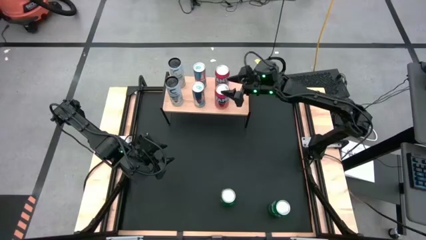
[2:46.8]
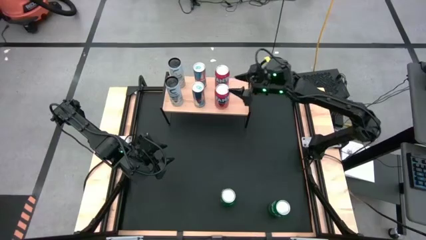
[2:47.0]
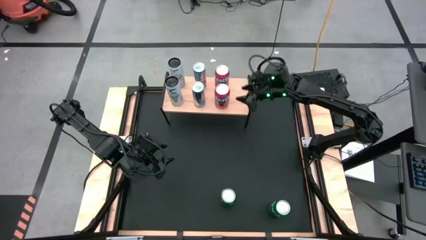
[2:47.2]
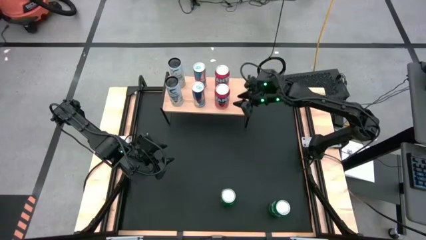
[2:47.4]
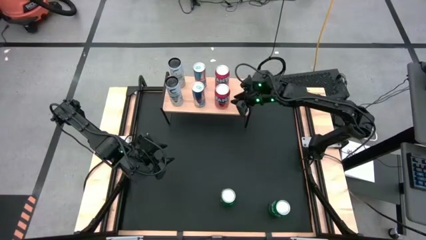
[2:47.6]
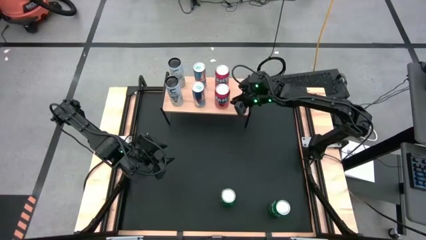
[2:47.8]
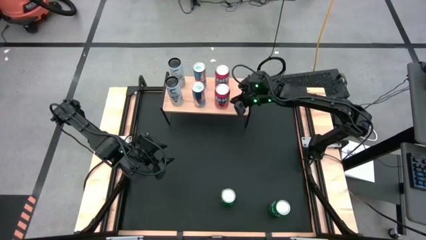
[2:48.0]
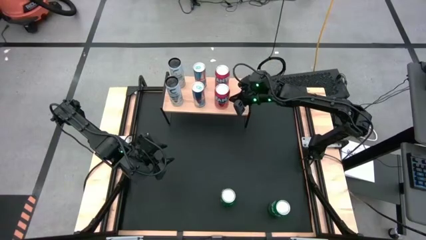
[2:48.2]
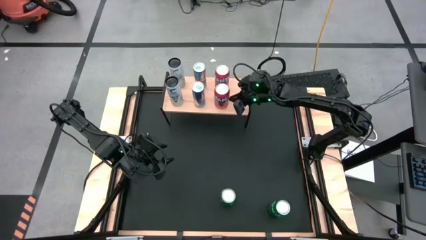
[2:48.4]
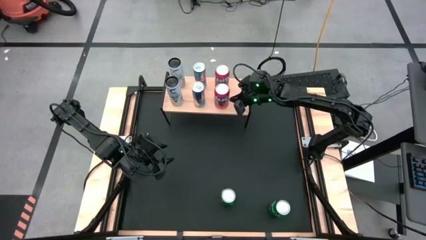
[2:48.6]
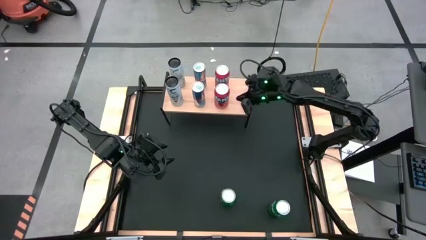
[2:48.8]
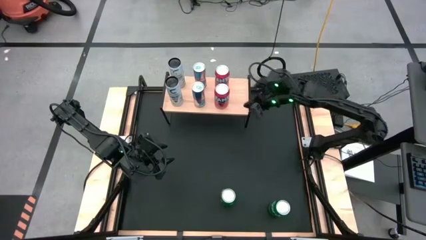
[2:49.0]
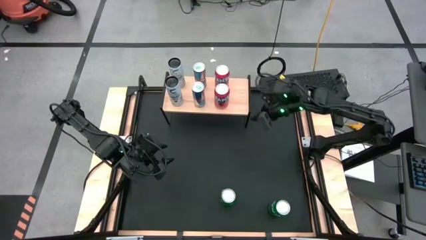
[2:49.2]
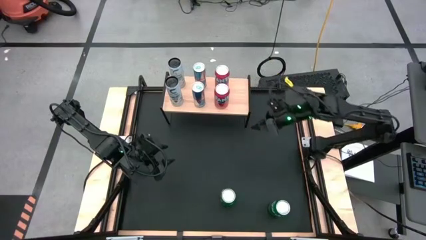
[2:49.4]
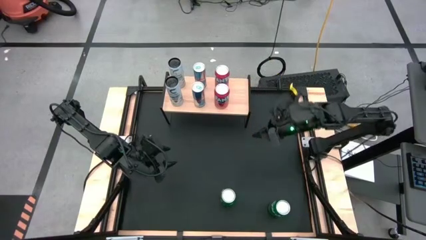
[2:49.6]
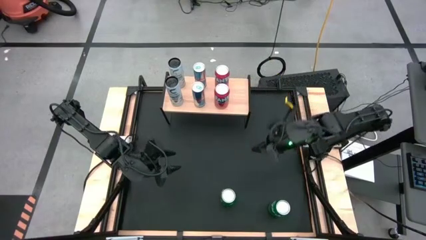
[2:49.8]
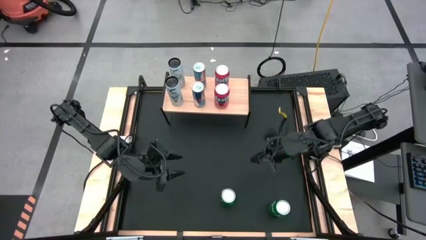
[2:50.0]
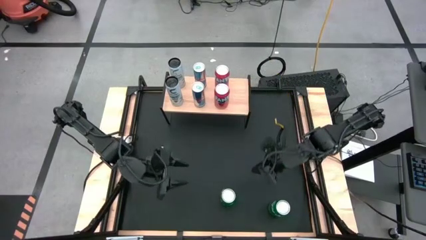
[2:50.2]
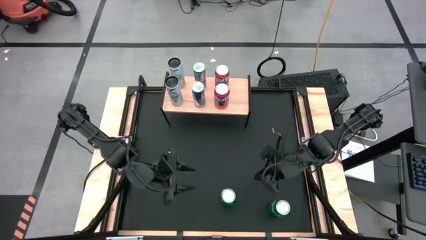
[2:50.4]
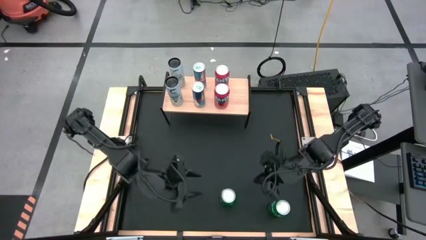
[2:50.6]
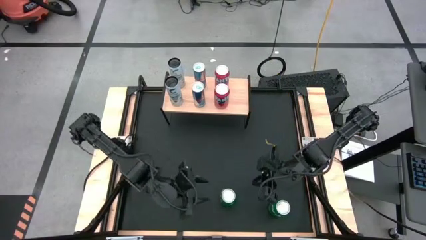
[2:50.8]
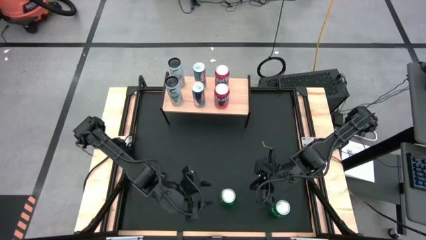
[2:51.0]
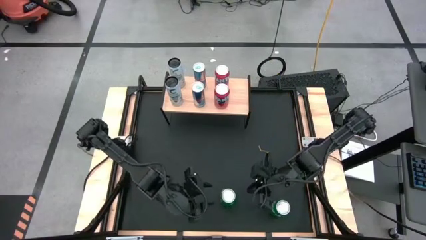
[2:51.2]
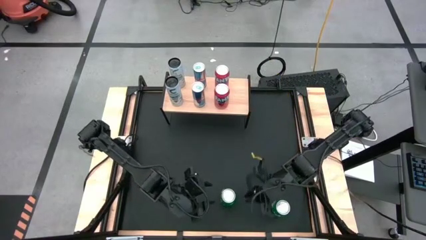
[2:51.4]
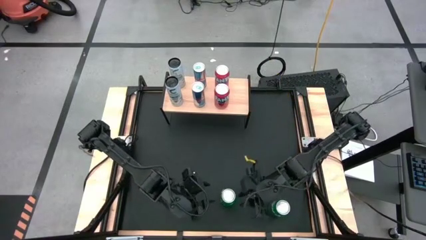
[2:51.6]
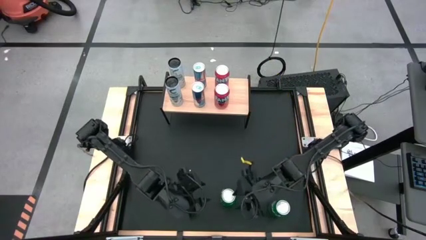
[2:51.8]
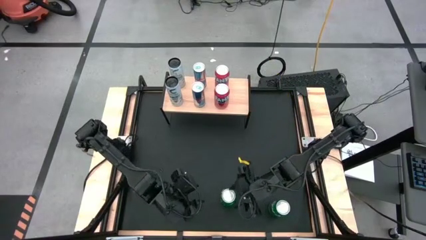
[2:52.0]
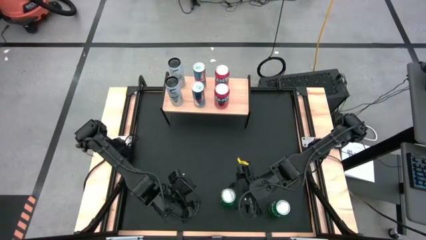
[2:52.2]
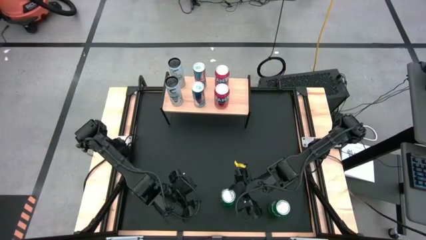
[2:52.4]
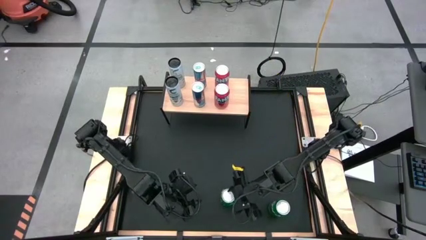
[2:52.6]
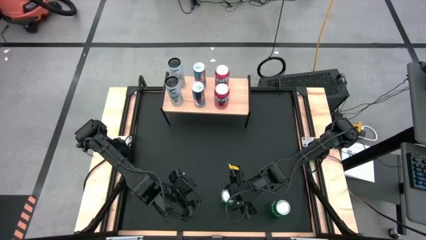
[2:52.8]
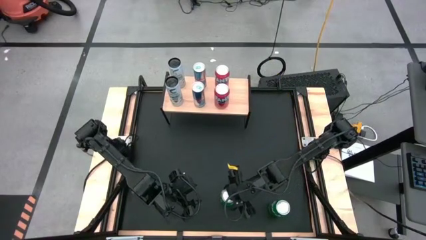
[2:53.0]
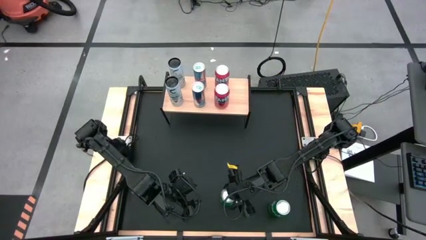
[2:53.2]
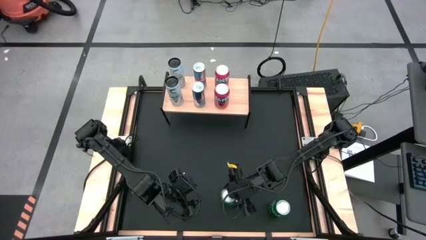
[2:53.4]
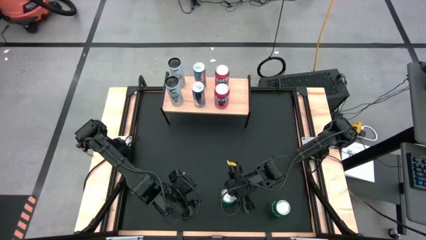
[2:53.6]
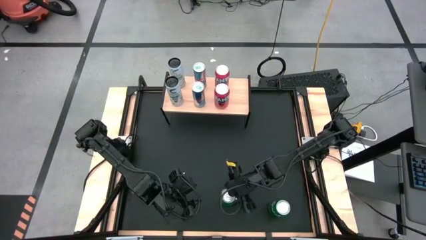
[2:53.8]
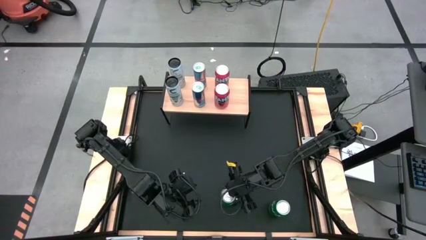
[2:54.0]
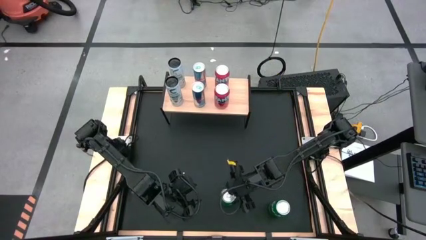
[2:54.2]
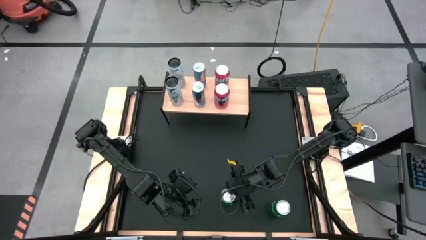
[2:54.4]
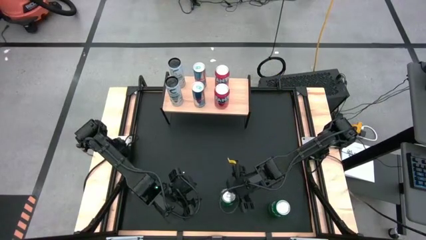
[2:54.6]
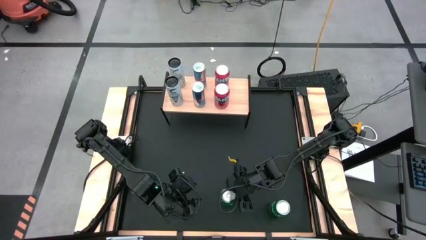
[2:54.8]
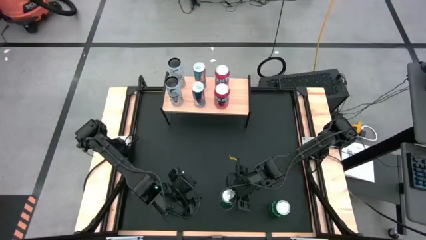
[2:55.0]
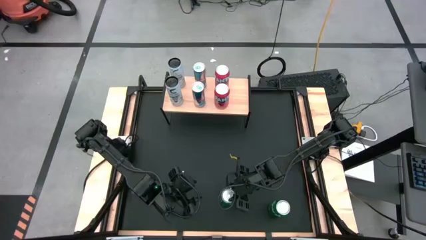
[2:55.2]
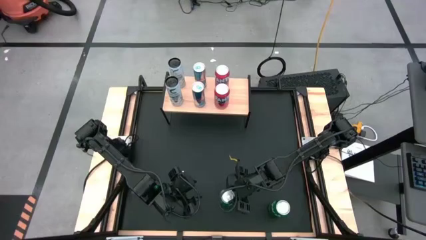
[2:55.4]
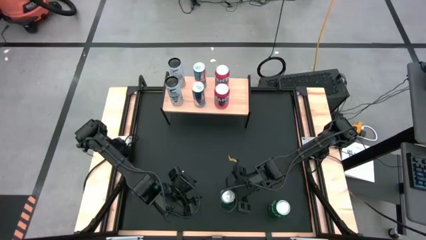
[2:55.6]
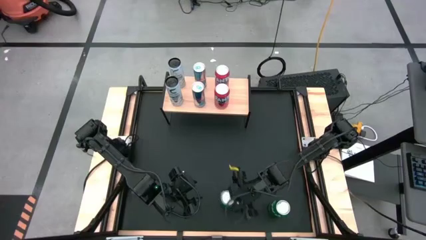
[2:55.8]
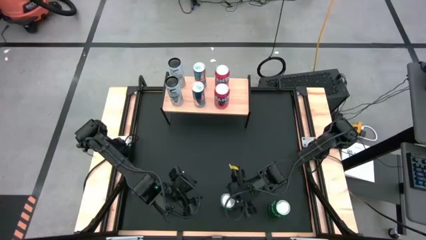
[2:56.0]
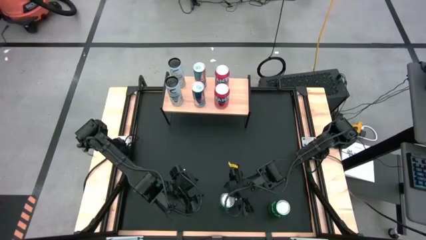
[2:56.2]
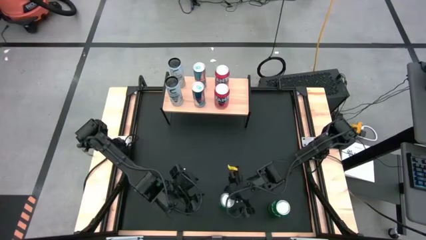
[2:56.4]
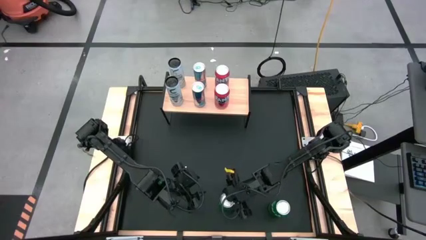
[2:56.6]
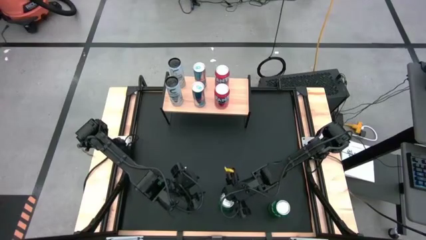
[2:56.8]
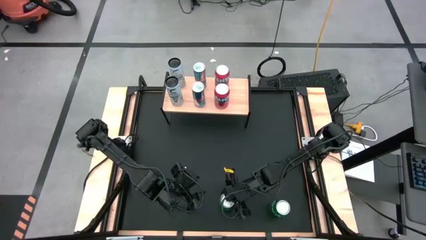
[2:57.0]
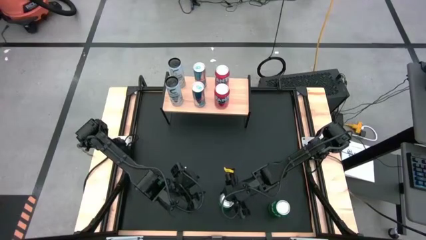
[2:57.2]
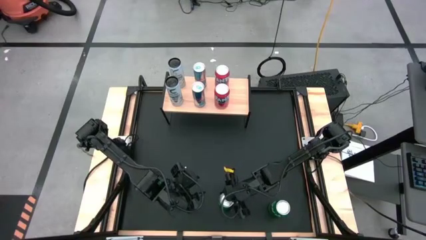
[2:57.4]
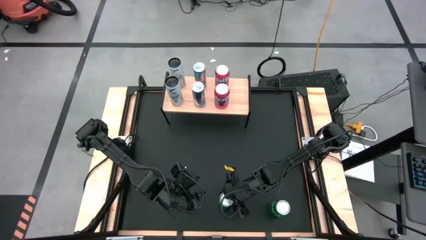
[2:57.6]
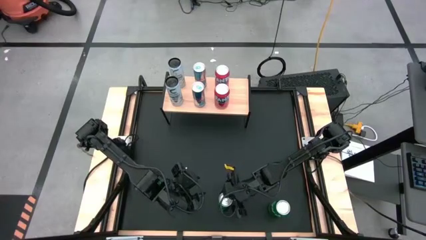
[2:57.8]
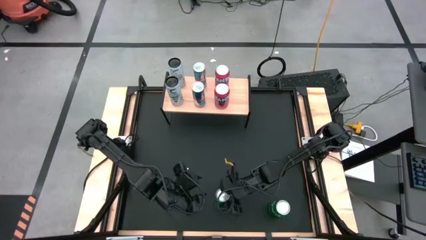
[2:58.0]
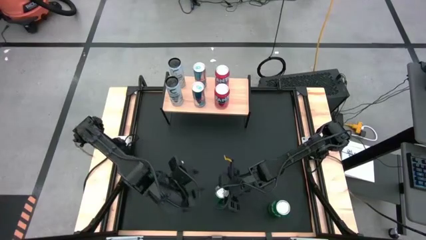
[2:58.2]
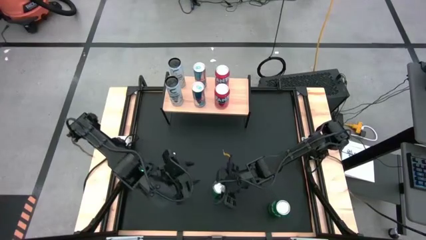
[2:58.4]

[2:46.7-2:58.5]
Task: Place canned beverage on shelf
Put the left green soda can on the shelf

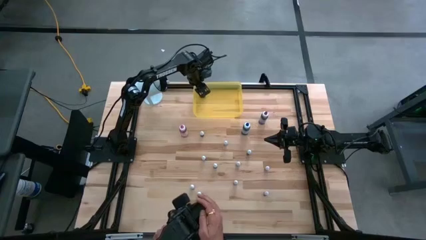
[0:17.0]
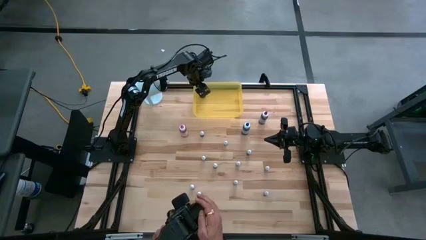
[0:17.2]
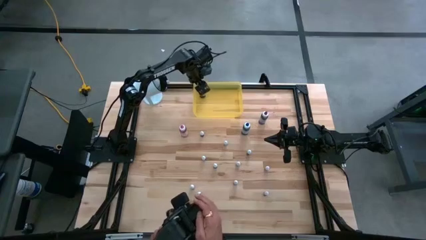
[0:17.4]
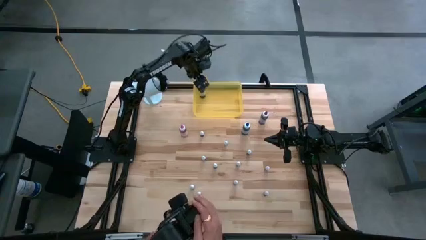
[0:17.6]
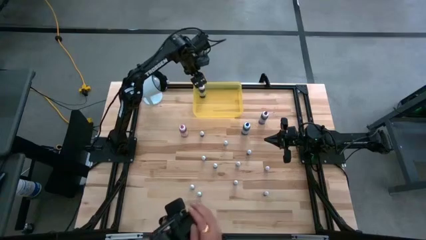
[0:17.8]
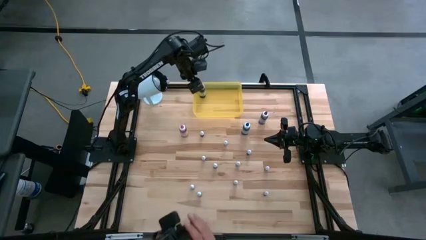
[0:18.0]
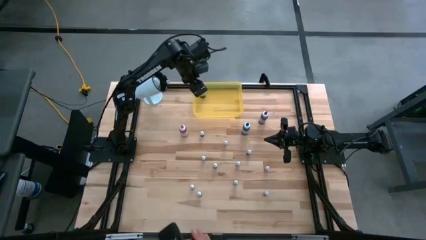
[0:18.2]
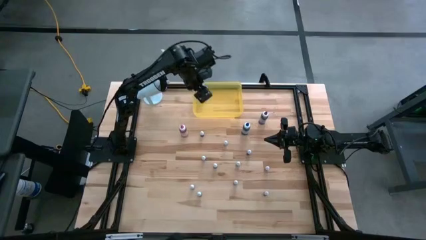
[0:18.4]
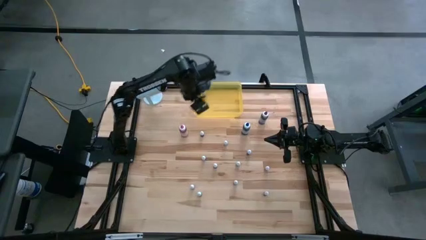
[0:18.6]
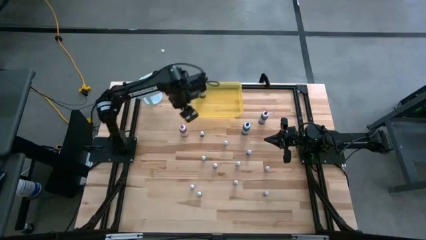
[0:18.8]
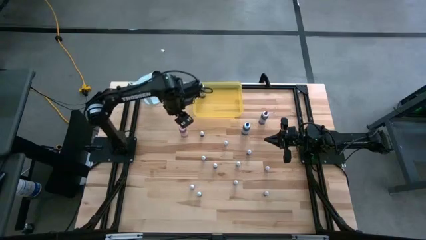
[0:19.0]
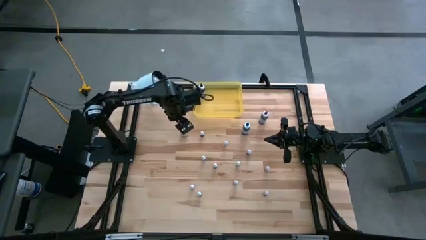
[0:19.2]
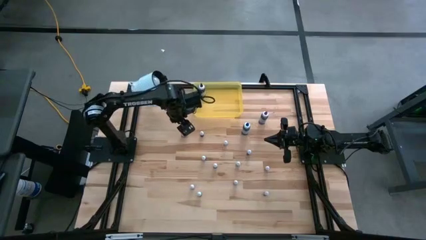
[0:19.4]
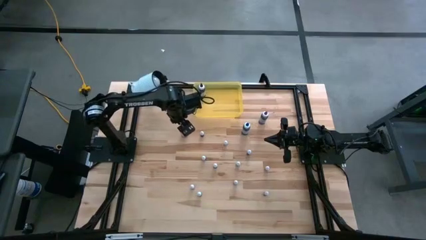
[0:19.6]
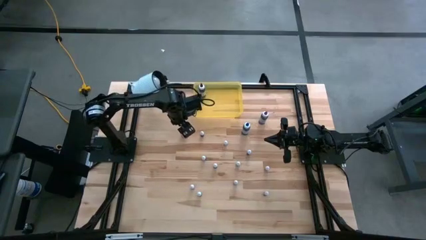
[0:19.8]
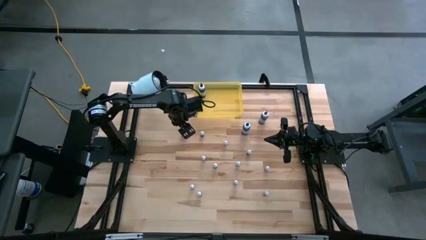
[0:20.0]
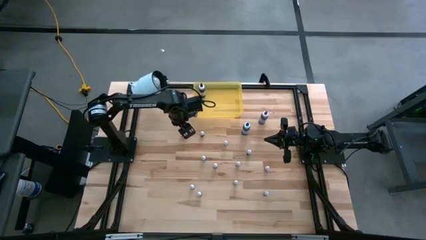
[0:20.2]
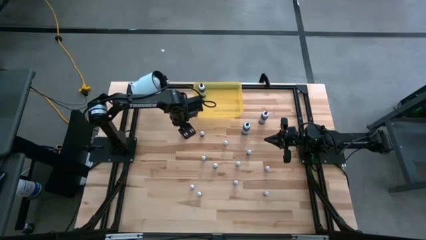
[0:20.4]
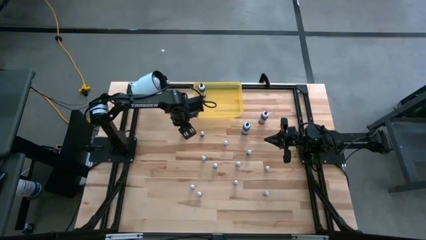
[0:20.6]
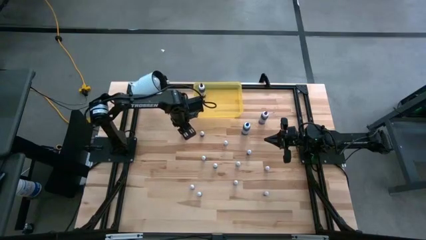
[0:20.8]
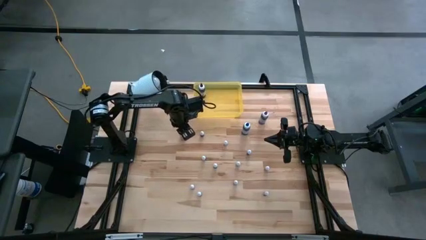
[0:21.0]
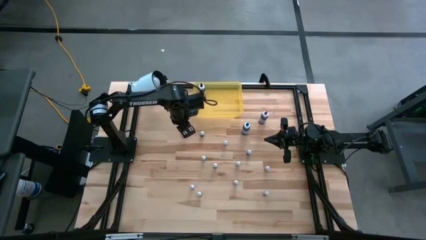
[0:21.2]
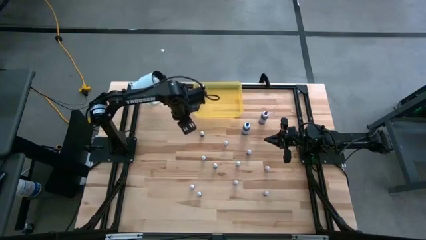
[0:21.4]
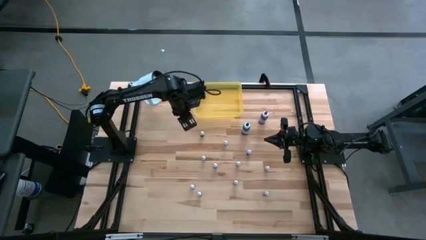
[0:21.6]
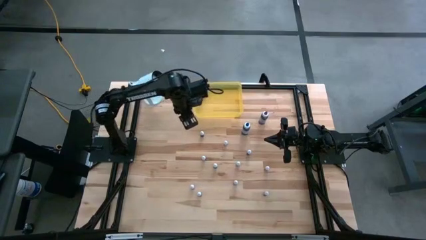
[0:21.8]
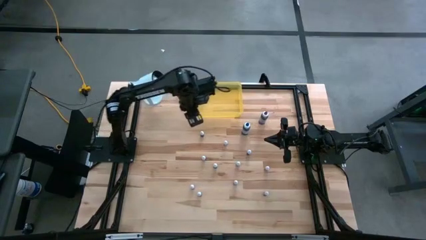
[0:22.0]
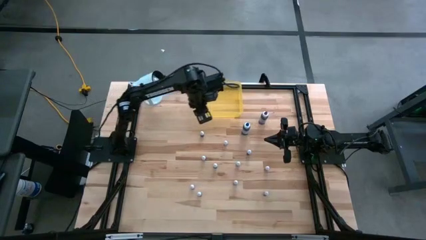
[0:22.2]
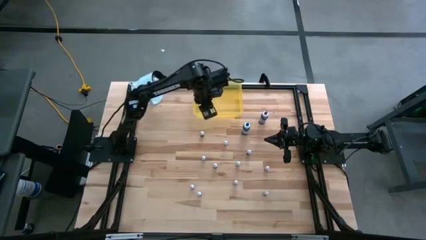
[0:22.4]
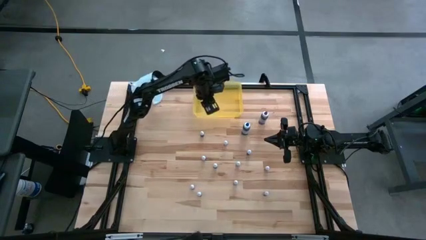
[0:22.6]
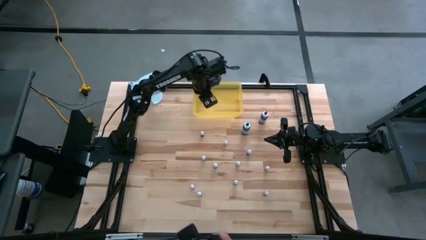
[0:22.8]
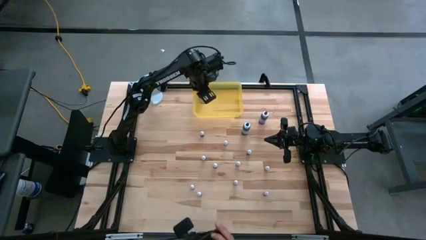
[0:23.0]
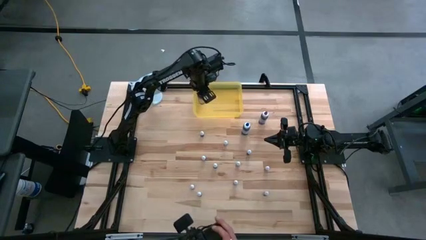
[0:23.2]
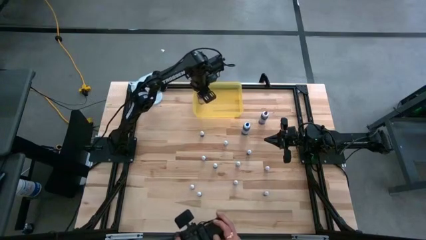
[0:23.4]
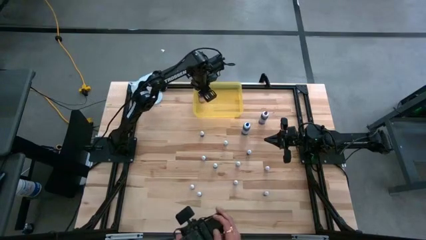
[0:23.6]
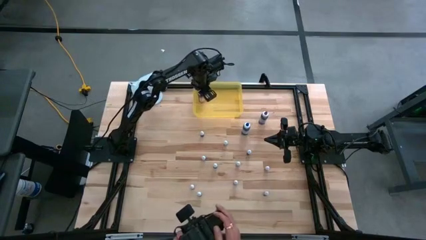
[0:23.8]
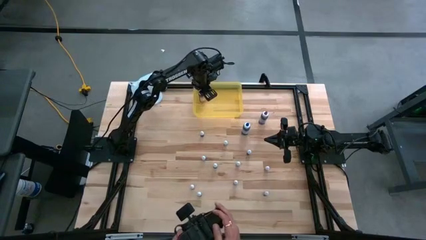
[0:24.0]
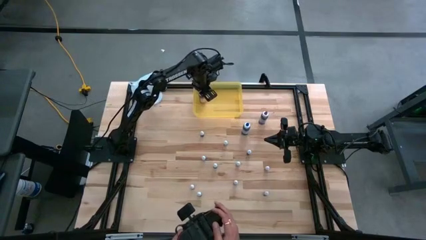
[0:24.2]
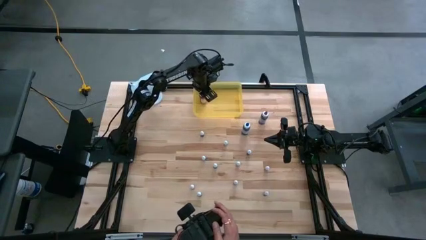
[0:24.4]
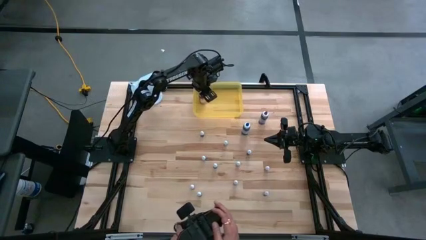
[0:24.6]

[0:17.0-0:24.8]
Task: Pick & Place food coloring
Put the large pink food coloring bottle into the yellow container
